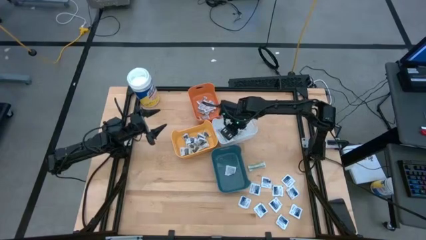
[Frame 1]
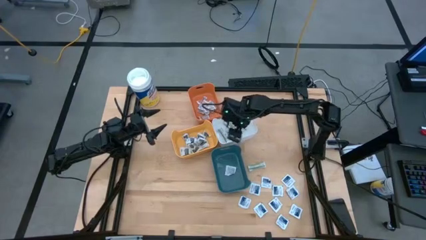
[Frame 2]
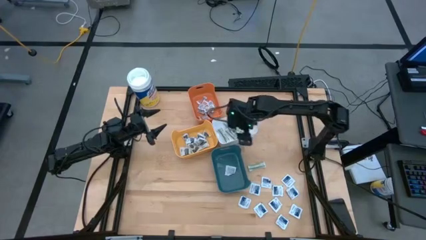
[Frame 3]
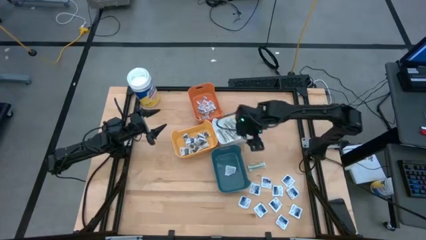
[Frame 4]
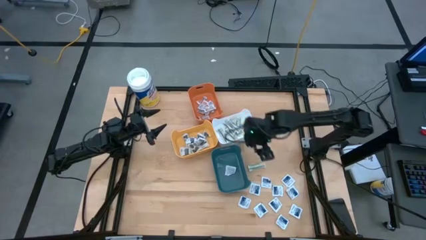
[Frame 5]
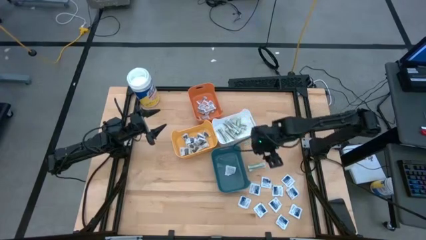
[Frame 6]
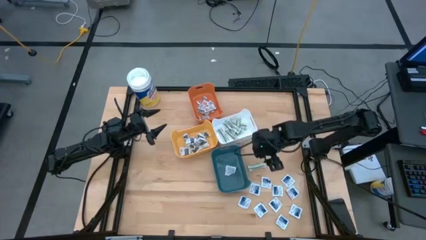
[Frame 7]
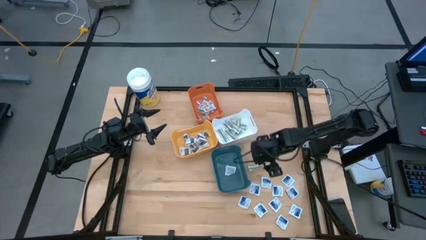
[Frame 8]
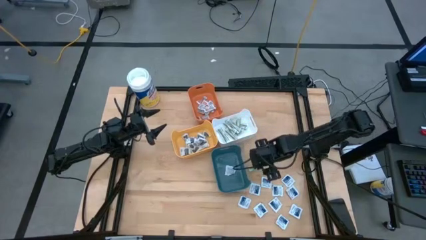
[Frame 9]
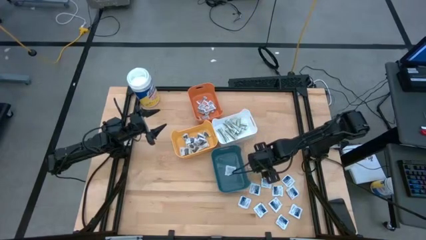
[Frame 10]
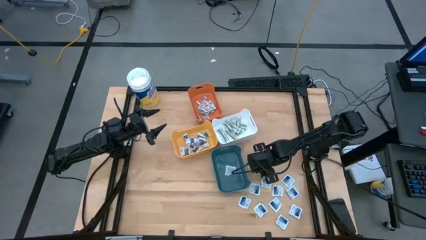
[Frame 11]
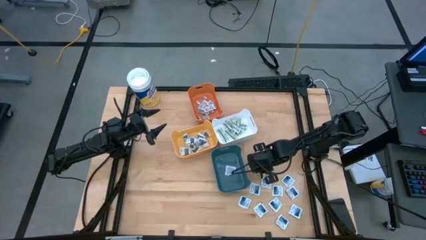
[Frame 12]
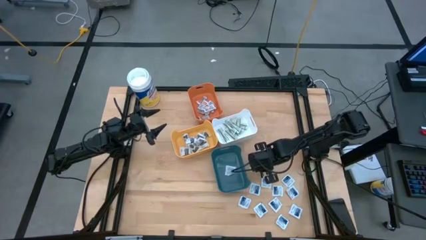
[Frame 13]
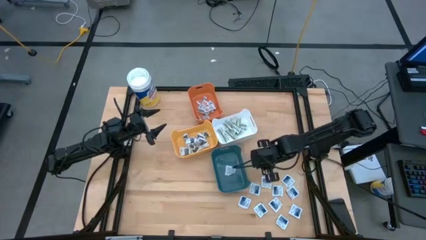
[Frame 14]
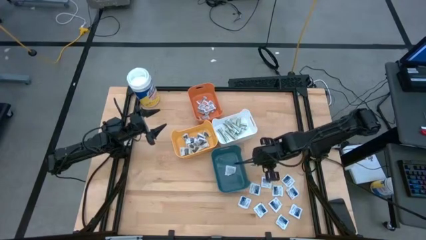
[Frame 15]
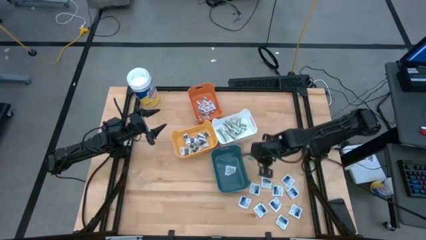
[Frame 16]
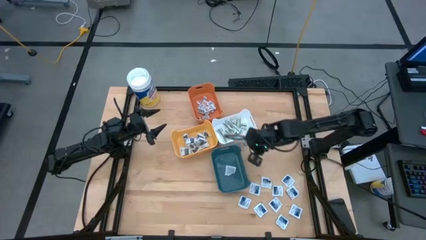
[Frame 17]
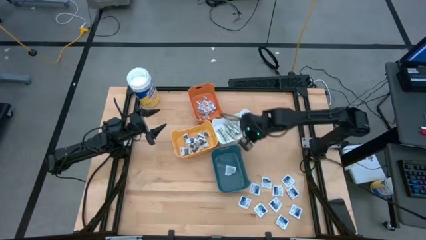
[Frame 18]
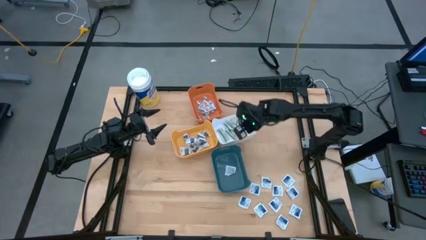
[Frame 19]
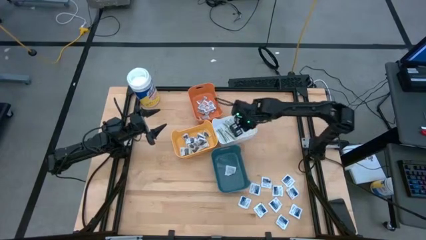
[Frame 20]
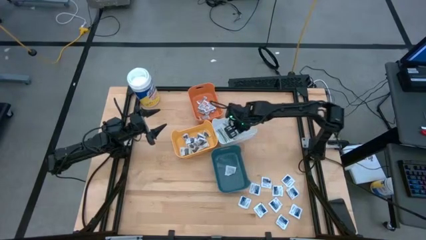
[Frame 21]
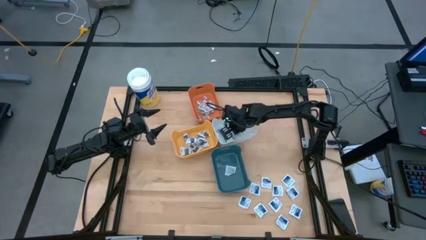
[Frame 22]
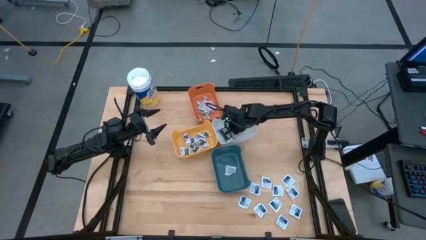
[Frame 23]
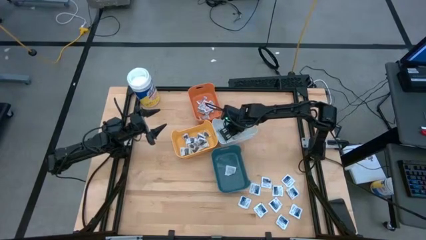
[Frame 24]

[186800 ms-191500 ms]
Task: Pick & Place First Aid Supplies
Put the green bandage into the white bin

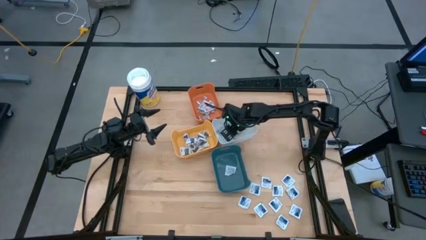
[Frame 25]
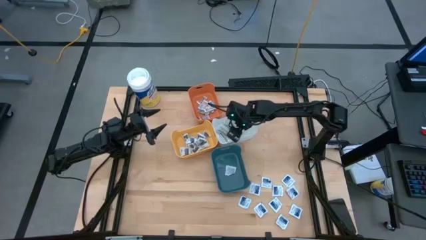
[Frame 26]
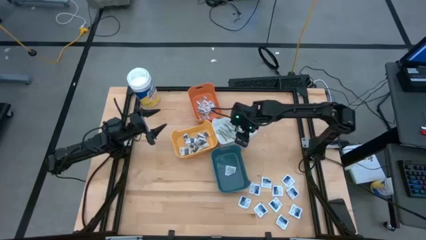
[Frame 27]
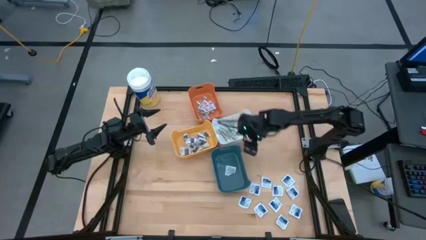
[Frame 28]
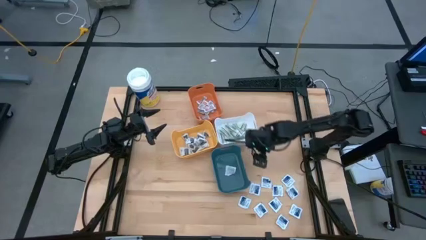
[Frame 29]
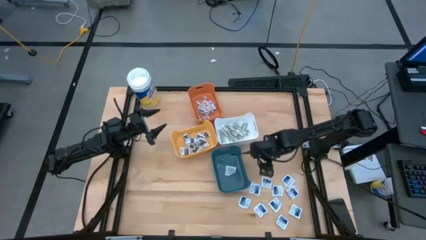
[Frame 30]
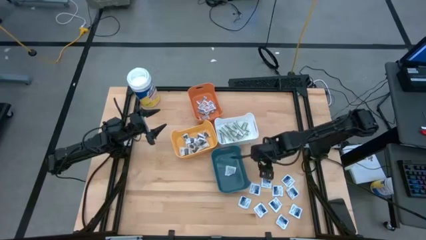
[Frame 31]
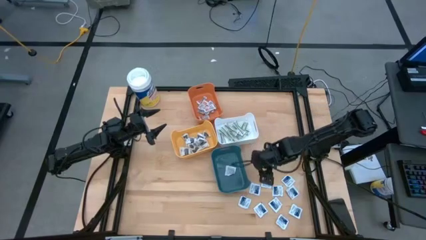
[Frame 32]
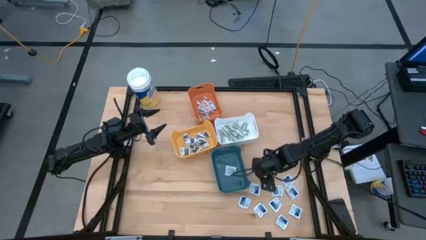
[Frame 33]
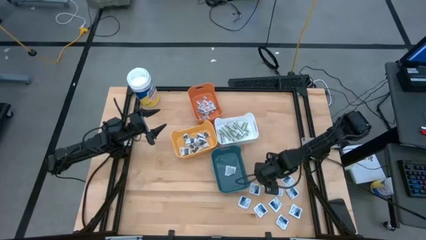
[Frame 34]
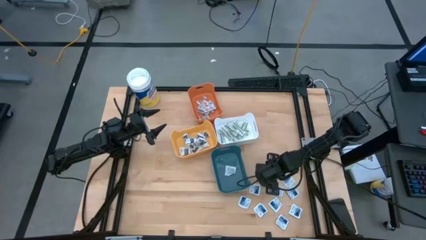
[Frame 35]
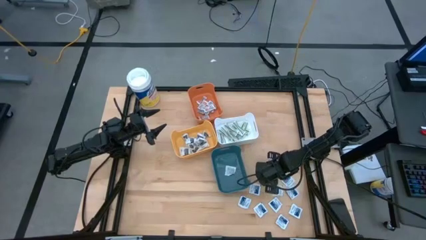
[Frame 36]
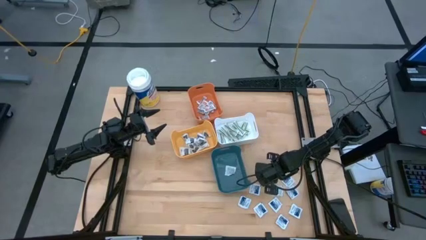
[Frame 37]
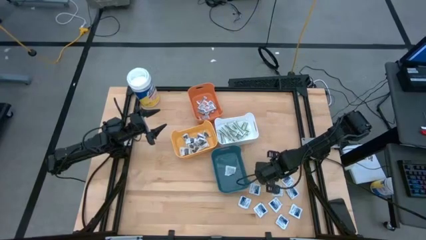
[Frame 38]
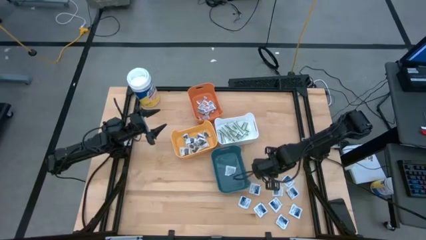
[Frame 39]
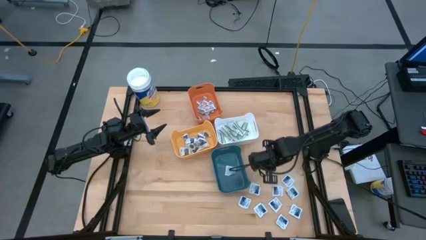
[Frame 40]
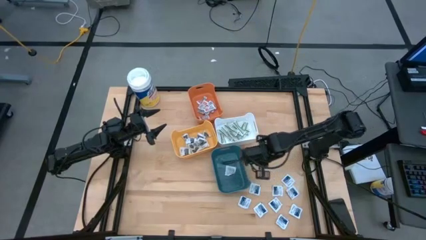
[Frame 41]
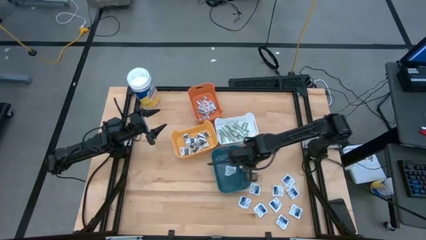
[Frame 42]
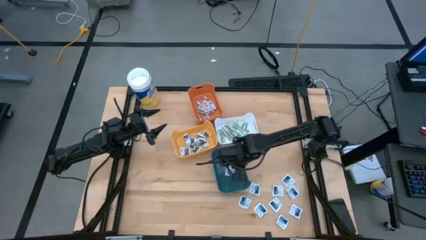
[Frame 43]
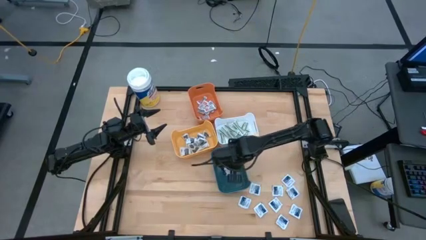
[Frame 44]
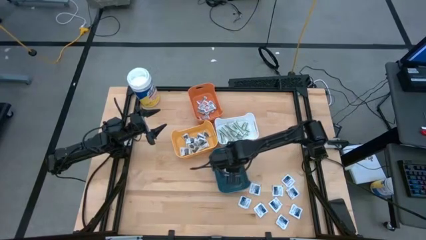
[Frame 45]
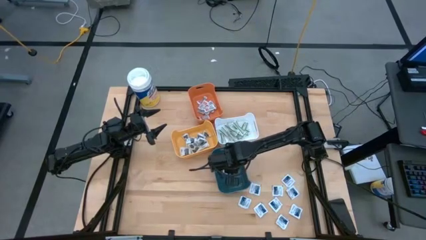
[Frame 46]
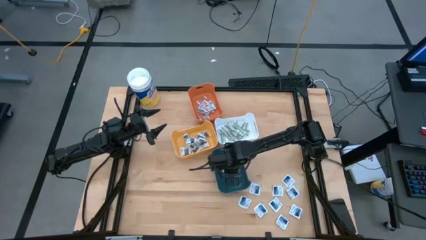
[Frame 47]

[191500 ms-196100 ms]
Put the blue alcohol pad into the blue bin

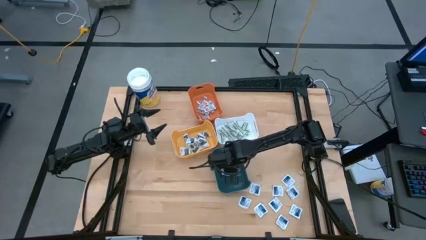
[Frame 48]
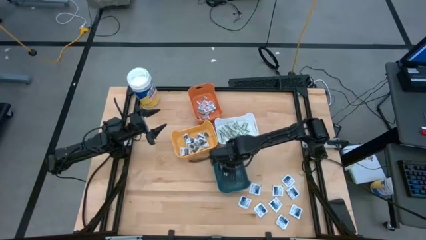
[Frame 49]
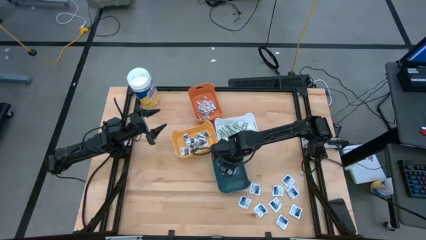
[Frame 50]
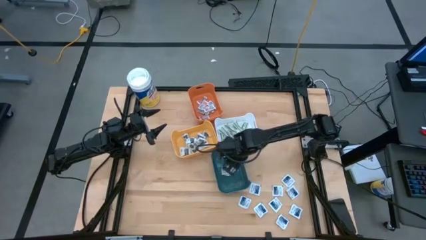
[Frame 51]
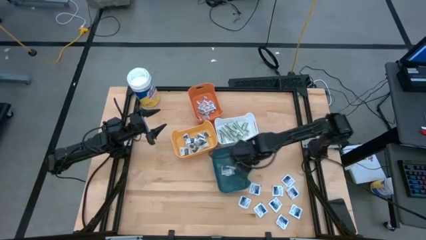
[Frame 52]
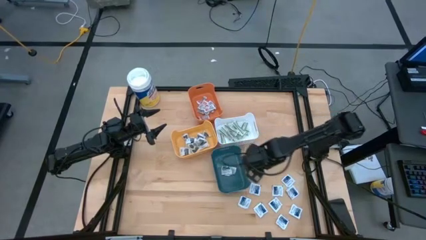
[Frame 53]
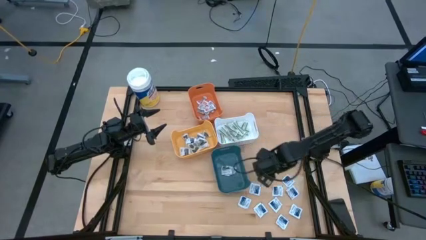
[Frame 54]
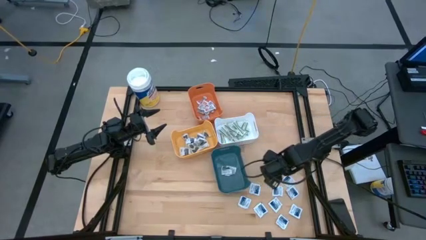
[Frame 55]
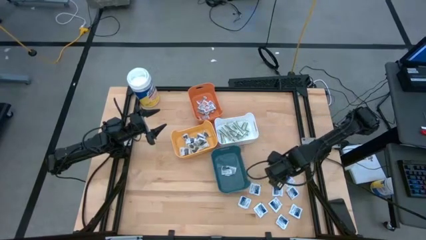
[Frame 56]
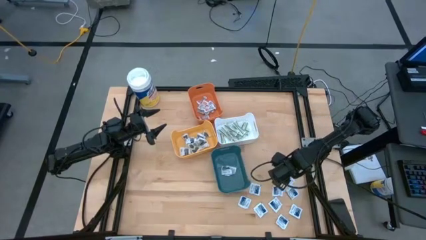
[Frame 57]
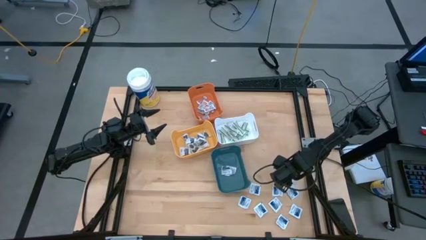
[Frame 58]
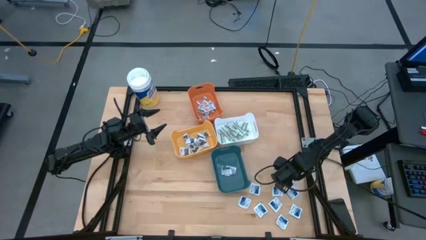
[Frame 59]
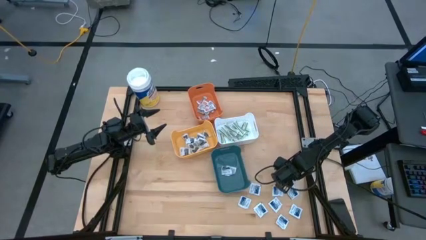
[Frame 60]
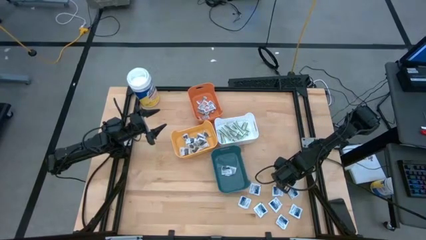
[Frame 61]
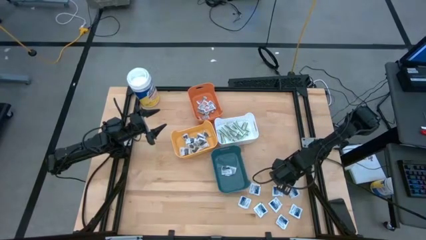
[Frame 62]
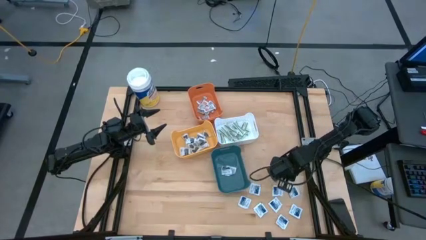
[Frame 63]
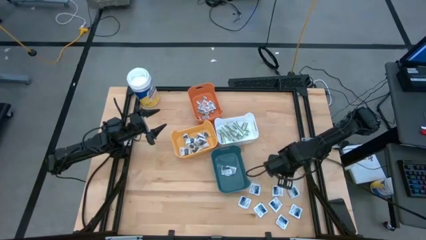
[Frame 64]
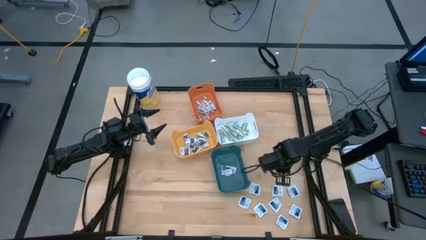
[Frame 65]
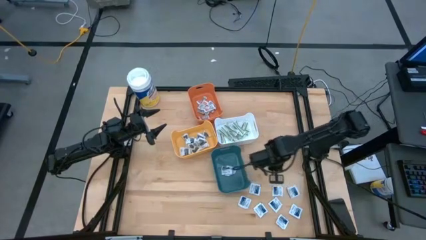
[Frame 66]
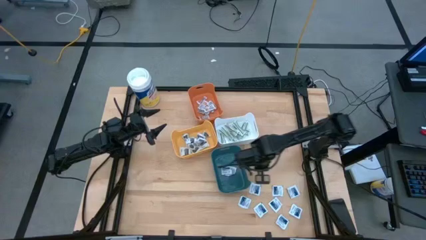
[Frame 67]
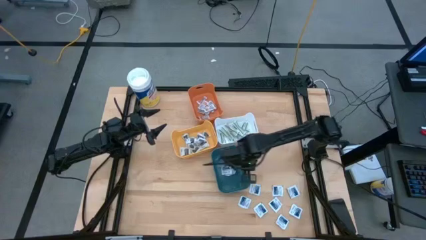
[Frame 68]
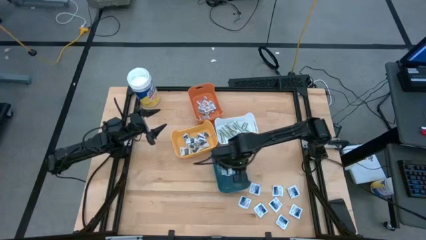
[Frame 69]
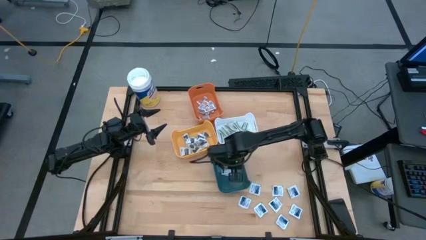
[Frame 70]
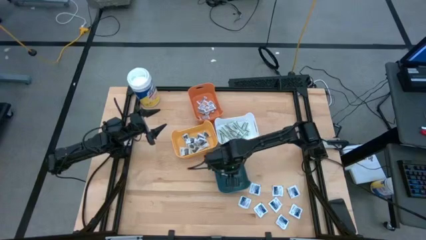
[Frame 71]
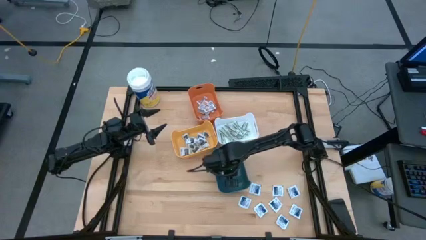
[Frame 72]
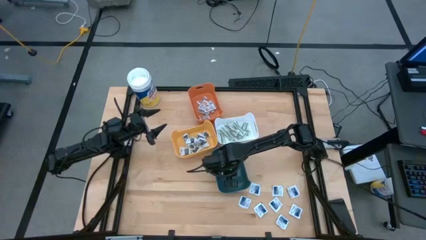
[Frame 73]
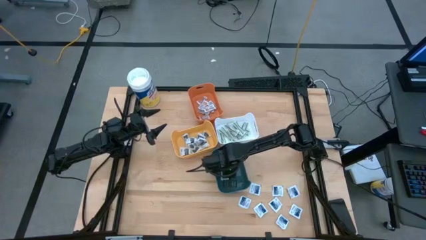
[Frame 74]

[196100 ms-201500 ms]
Put the blue alcohol pad into the blue bin
